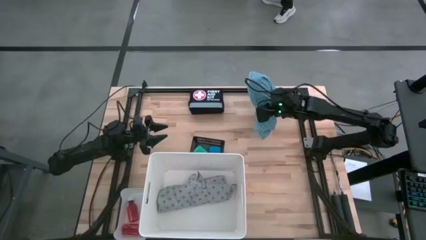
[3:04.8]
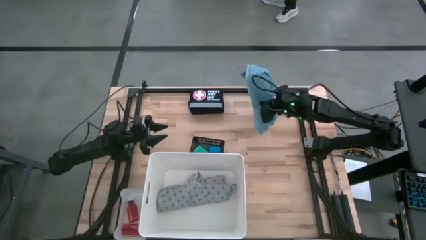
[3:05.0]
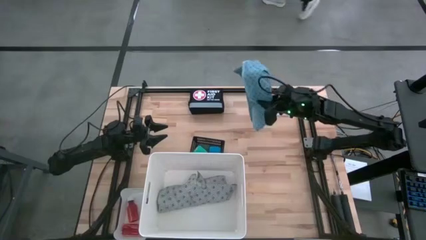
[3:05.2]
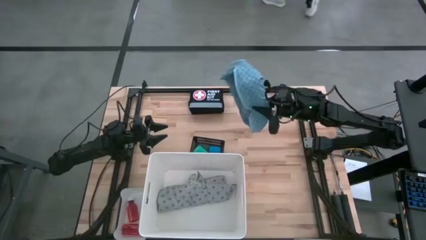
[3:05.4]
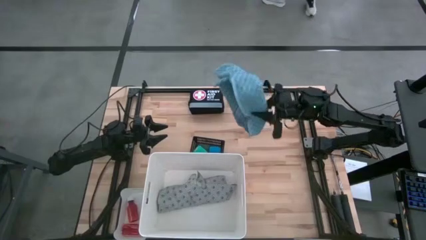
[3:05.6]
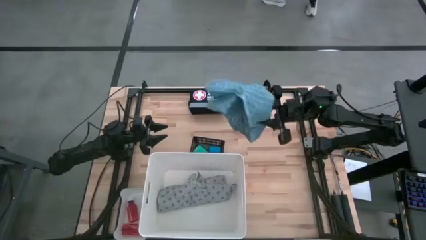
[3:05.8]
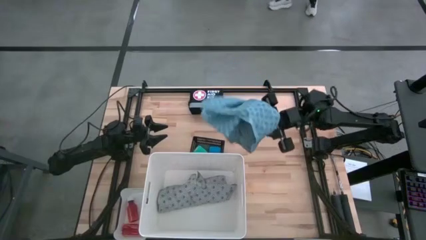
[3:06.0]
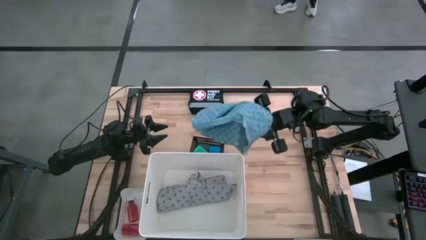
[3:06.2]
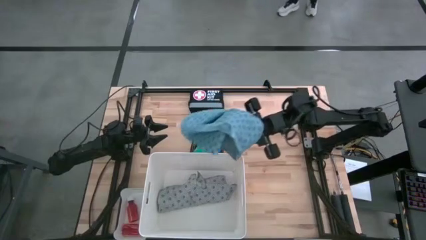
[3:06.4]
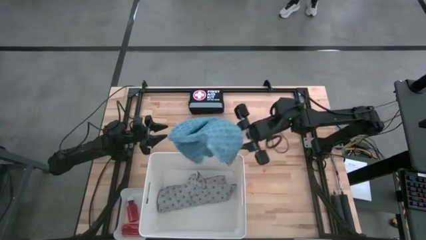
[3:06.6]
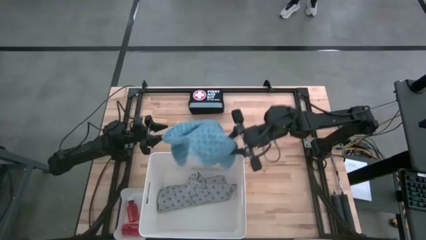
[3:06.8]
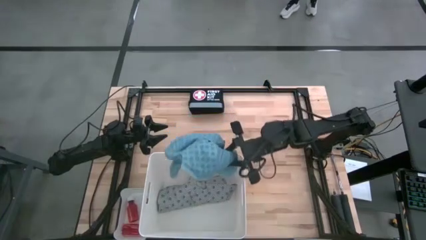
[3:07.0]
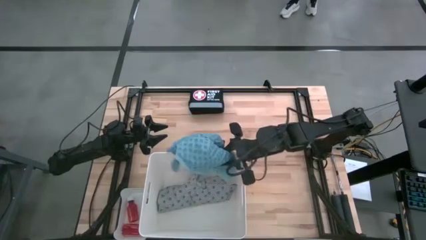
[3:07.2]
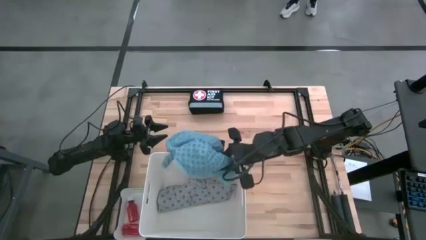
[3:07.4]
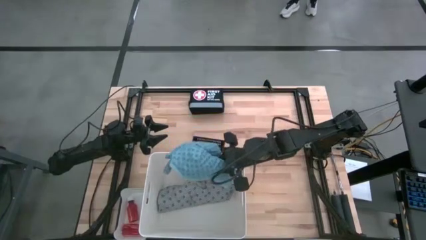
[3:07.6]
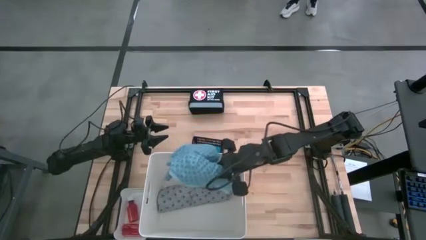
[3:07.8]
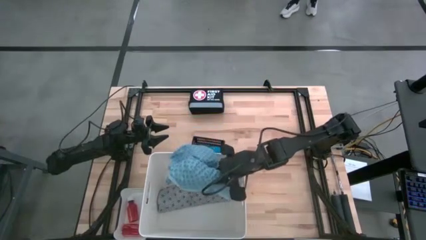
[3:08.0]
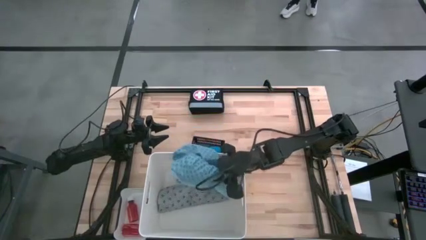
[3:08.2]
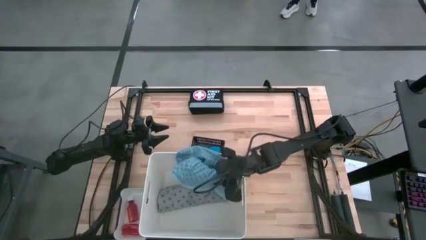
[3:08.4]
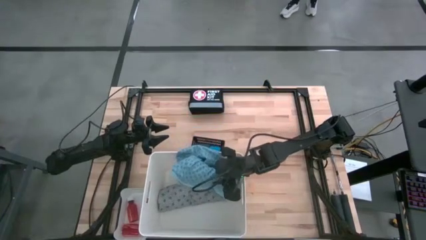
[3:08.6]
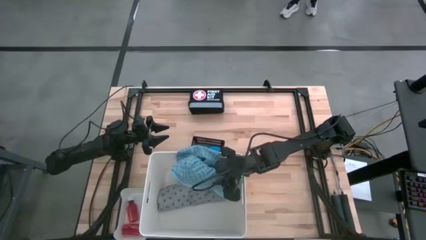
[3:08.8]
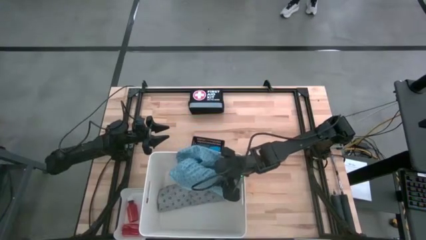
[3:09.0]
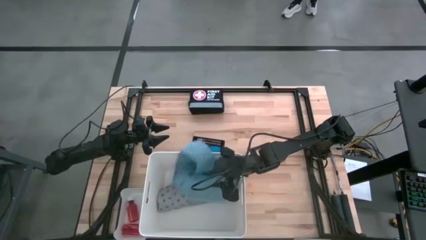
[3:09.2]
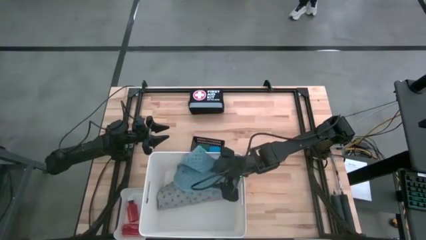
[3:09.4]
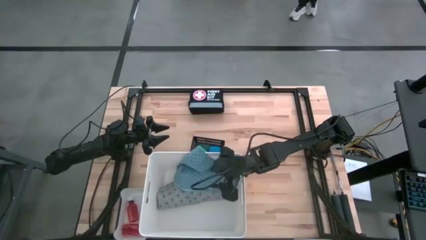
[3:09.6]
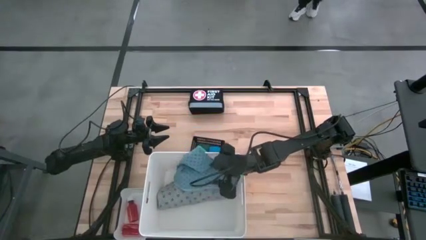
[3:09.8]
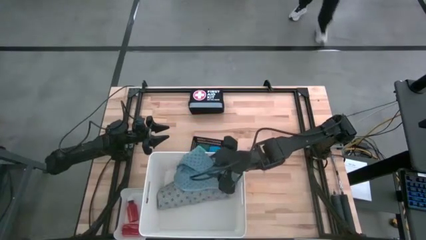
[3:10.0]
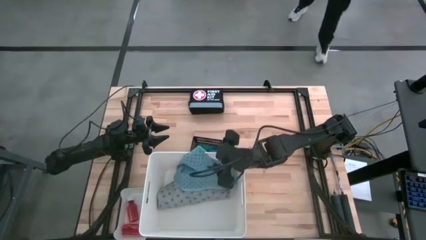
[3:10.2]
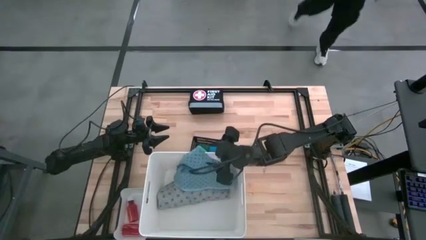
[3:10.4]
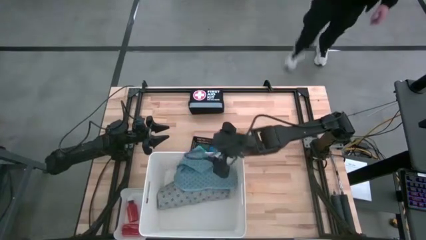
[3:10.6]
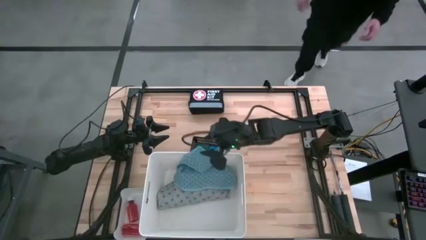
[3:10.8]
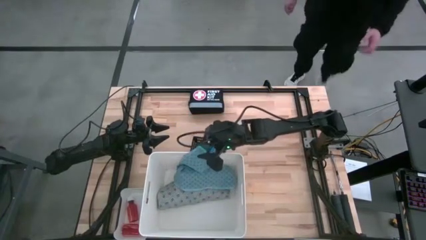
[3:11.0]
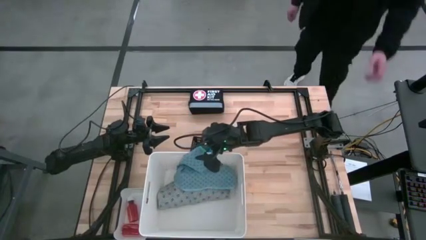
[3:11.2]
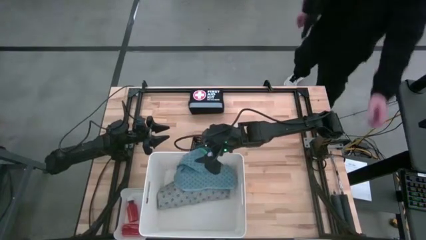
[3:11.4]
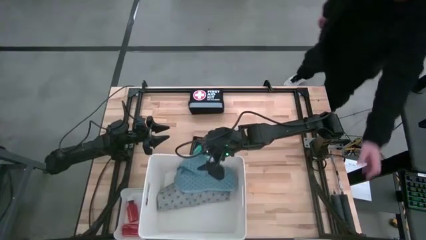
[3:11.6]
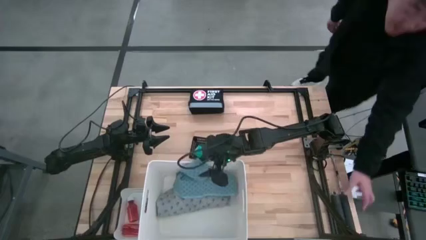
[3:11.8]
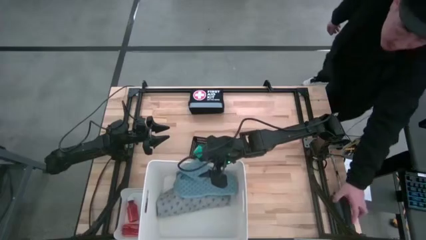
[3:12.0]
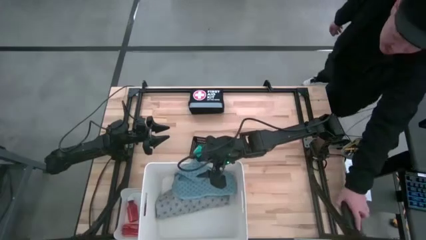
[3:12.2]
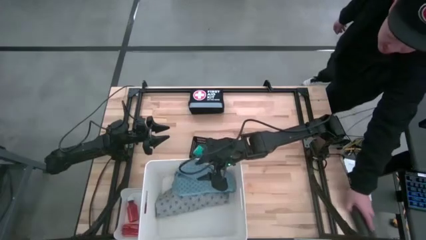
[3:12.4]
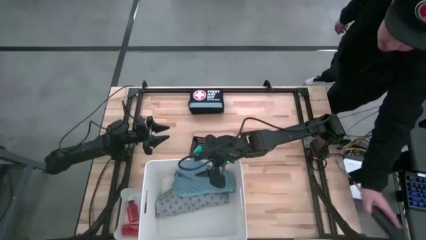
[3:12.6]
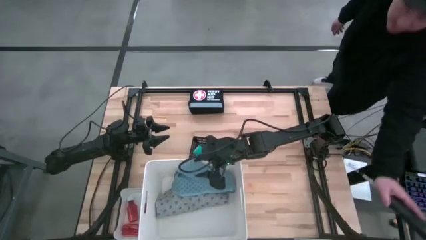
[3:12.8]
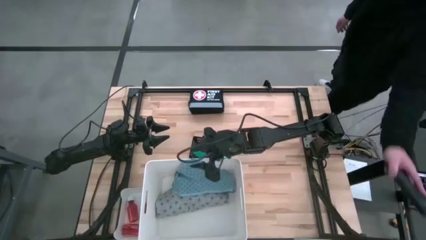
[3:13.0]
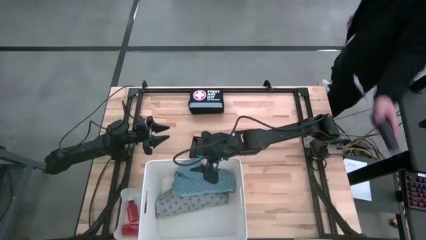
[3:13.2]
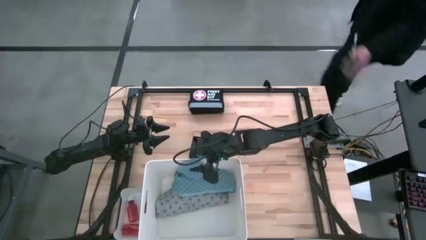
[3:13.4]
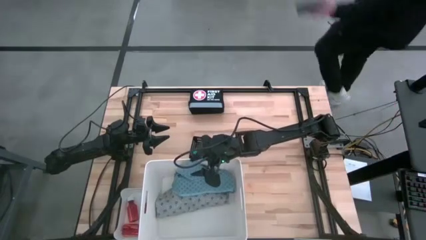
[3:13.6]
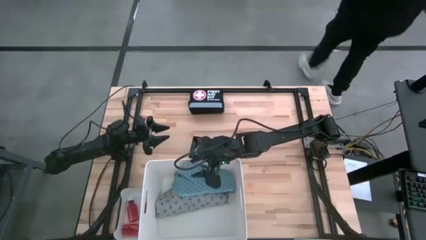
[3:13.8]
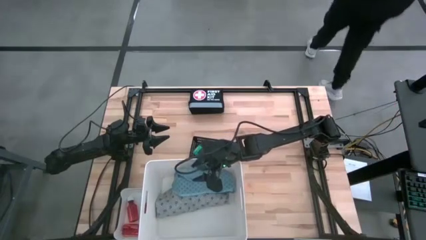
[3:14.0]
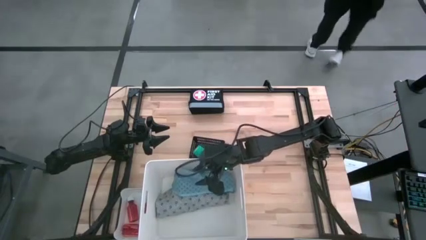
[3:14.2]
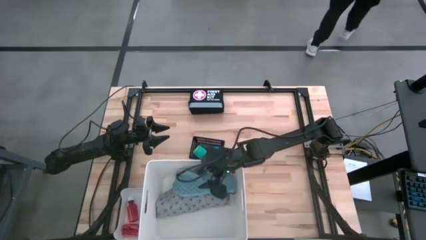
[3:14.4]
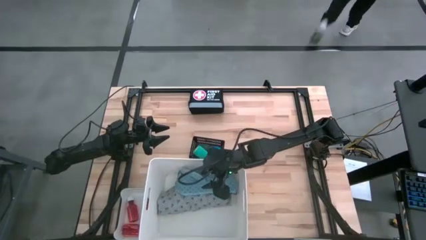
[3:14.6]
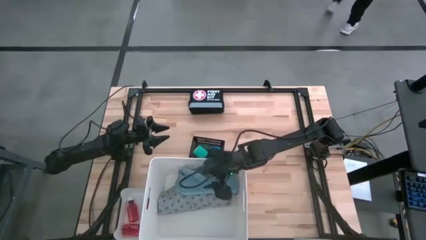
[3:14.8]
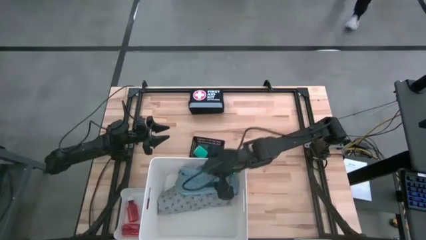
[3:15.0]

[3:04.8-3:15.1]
Task: Pick & Place Medicine items
Put the blue patient gown into the large white bin

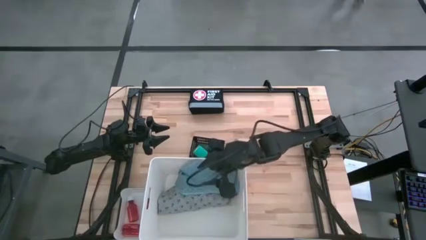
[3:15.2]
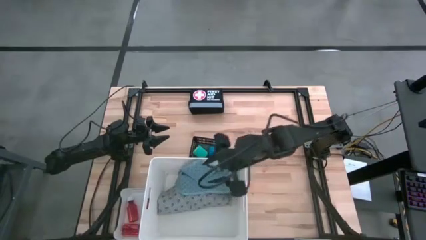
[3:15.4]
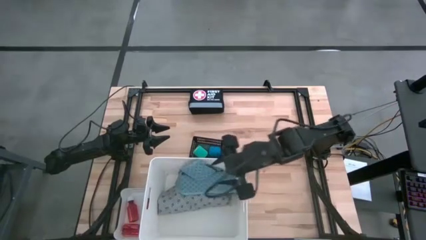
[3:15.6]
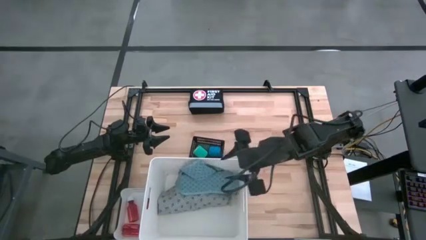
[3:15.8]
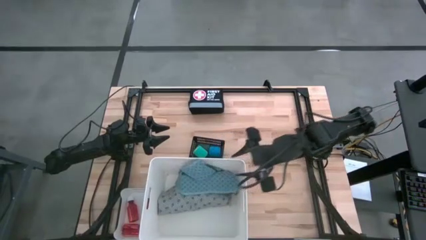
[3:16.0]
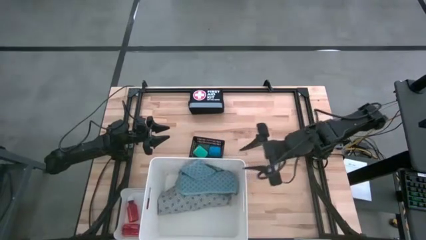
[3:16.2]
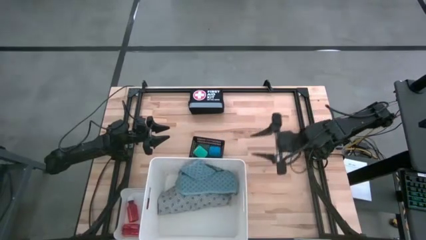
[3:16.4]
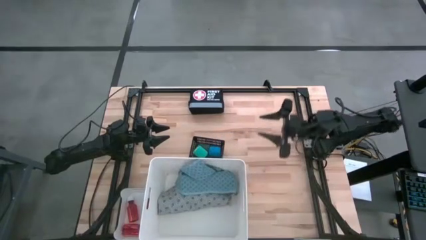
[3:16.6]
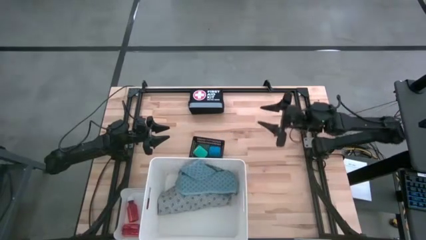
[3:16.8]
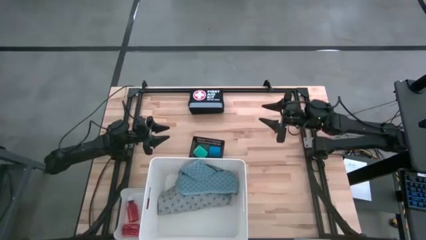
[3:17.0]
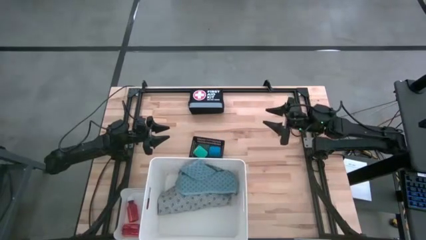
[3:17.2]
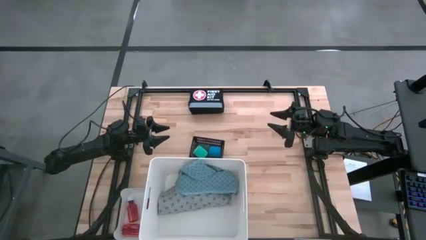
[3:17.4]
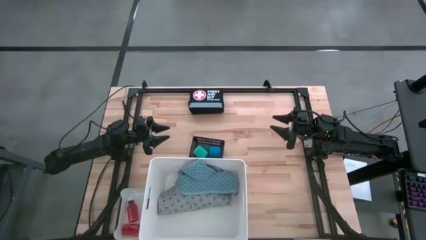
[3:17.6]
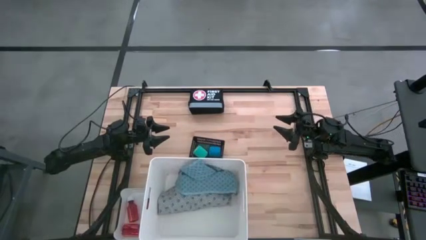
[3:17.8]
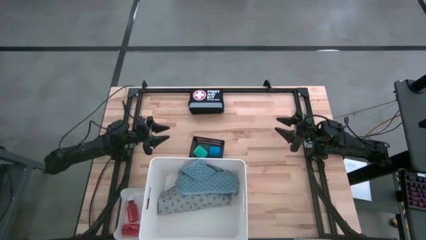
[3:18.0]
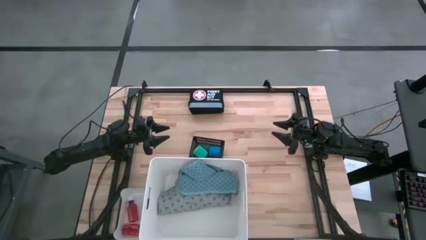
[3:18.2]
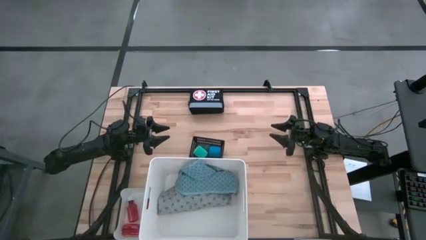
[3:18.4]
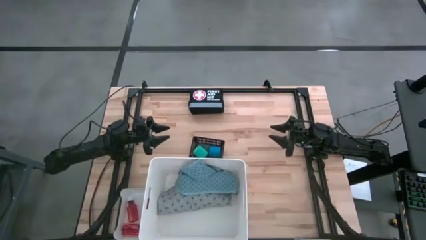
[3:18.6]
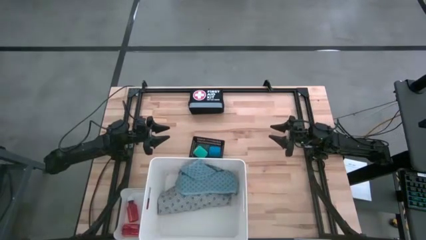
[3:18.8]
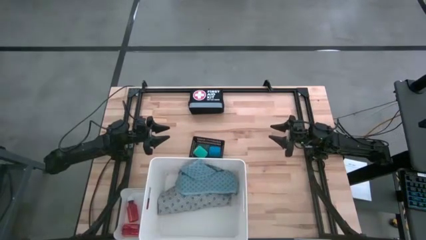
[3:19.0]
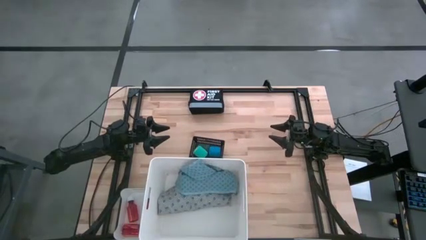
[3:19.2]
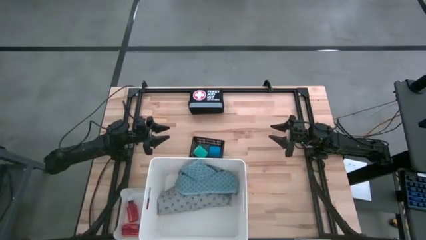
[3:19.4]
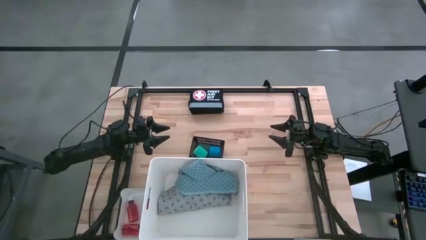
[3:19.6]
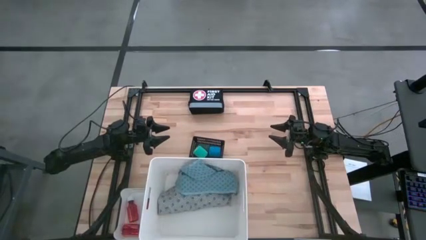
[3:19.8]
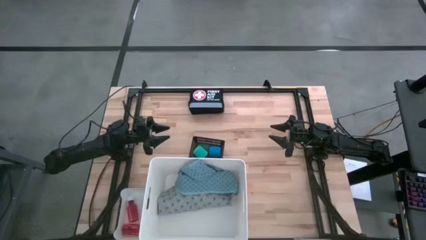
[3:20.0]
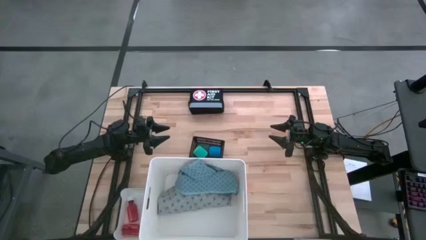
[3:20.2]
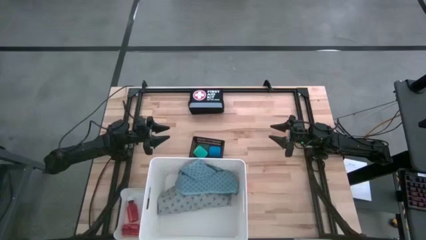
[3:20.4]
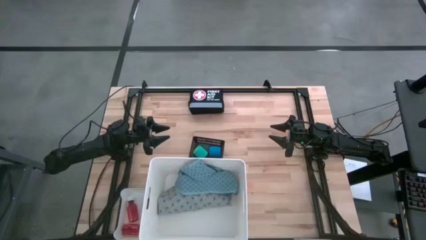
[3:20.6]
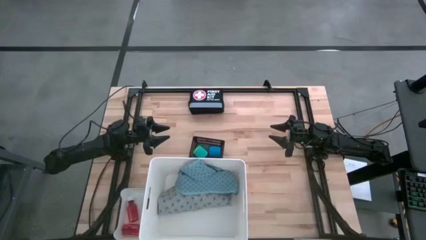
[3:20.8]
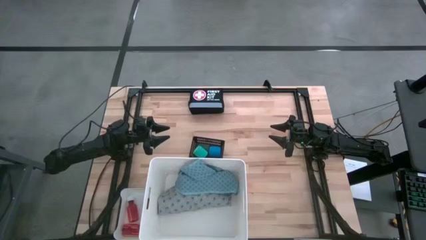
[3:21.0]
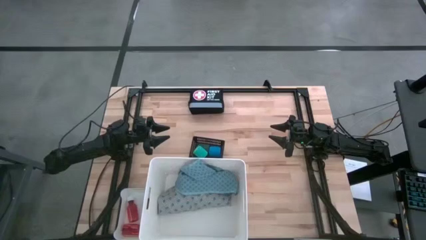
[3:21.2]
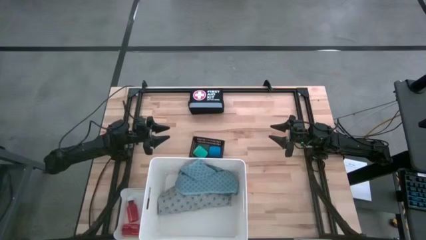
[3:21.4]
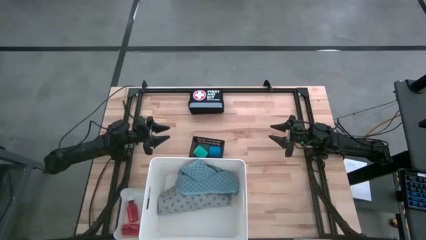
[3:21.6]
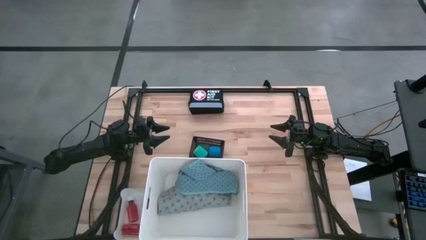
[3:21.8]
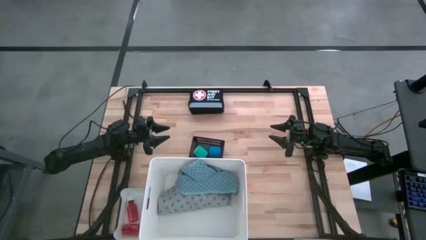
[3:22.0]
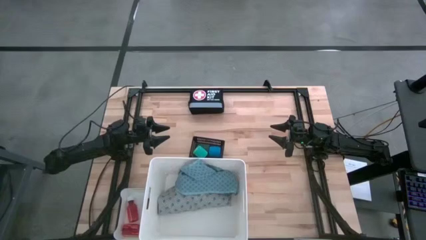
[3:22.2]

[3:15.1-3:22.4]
Return to Home Position
